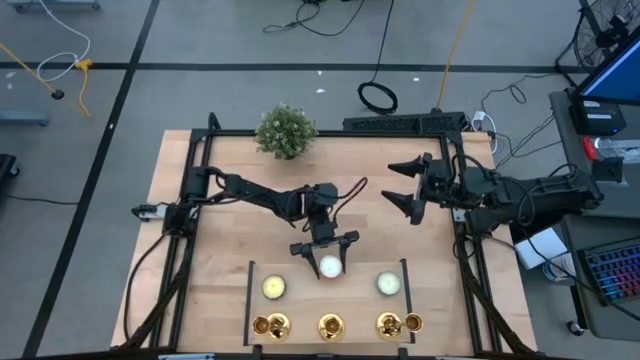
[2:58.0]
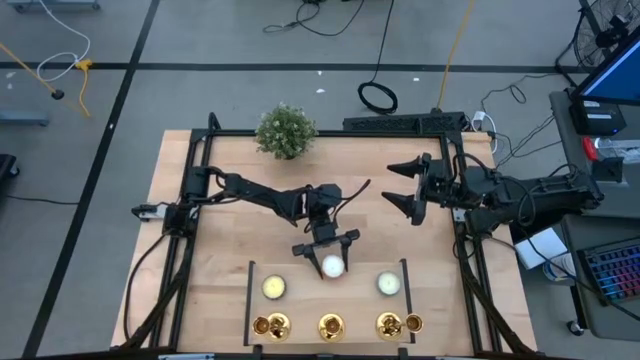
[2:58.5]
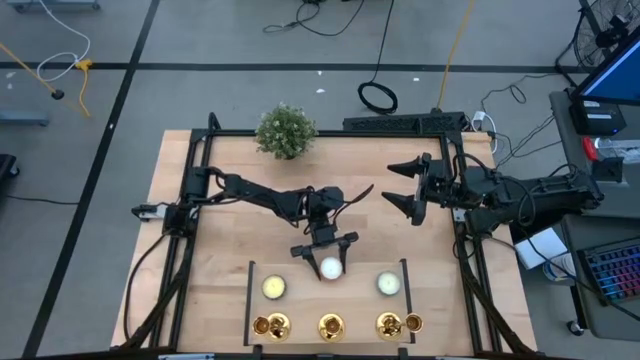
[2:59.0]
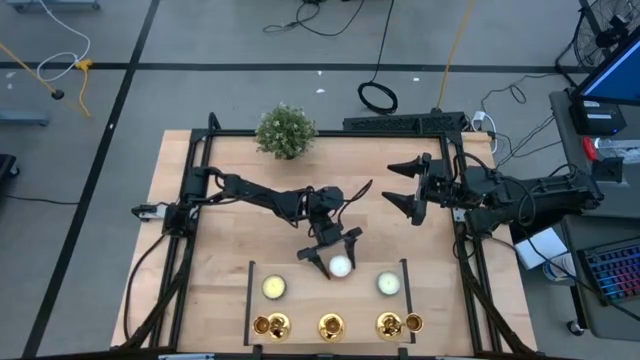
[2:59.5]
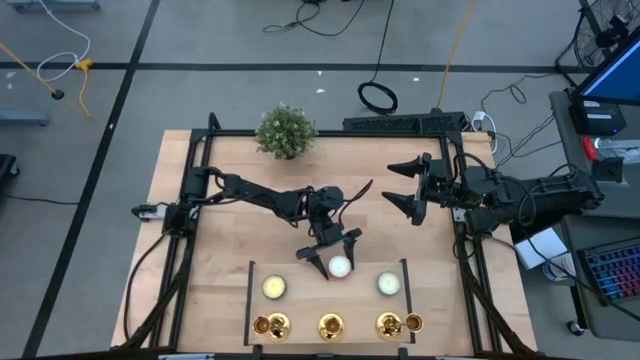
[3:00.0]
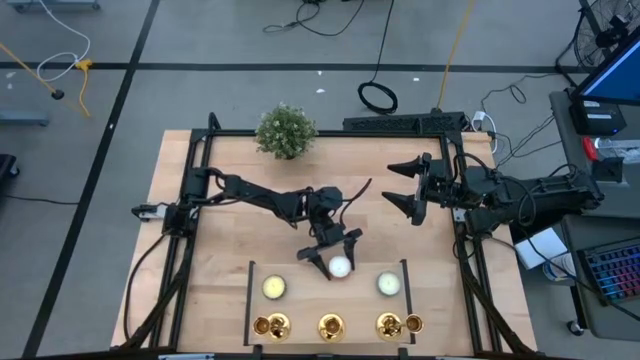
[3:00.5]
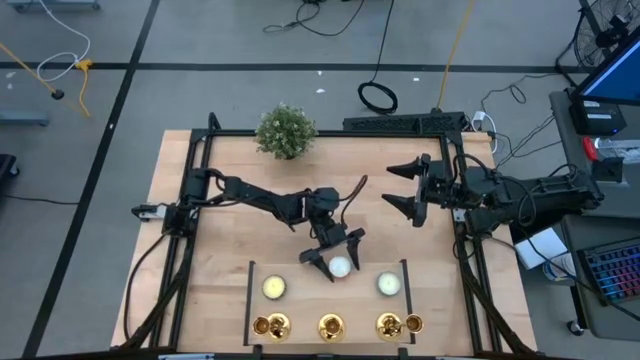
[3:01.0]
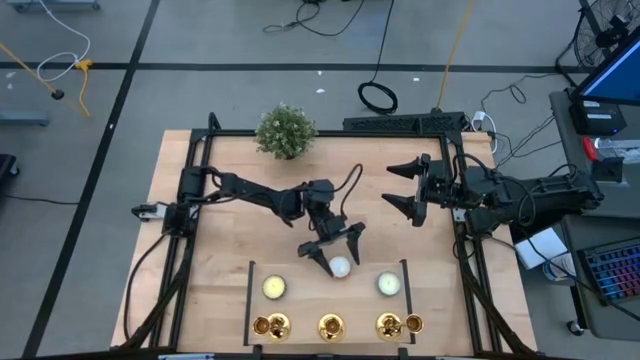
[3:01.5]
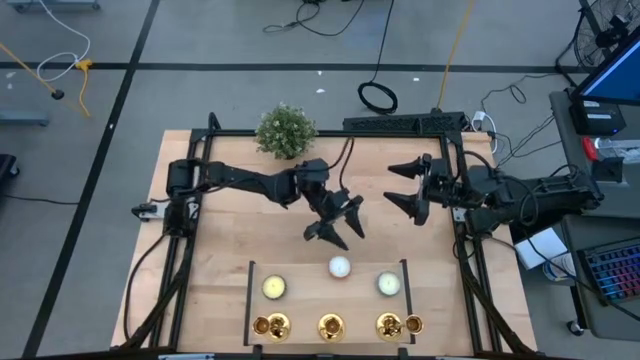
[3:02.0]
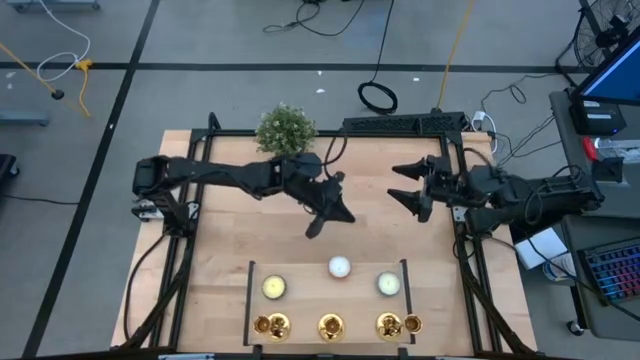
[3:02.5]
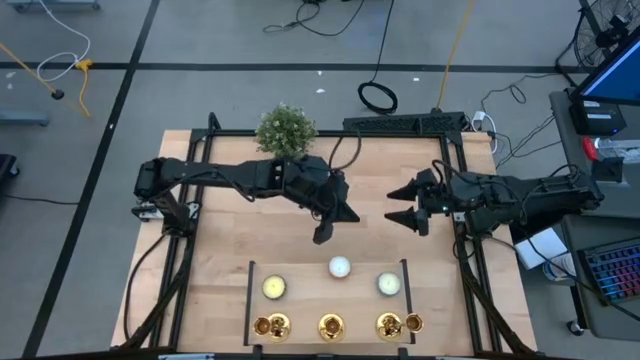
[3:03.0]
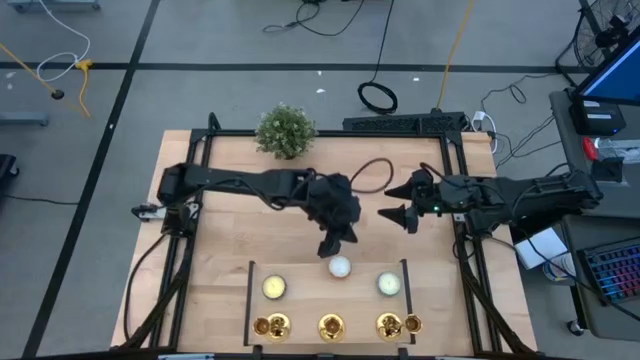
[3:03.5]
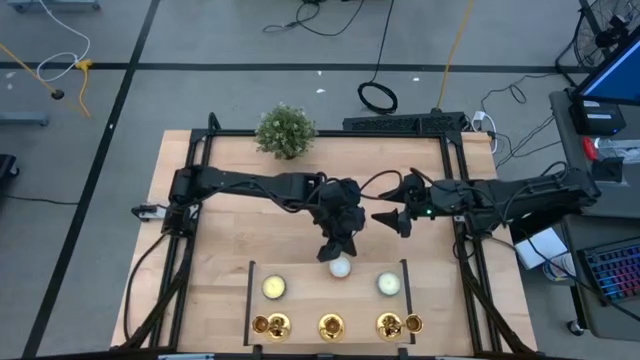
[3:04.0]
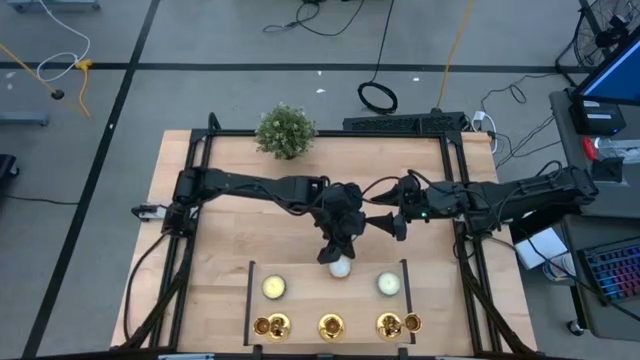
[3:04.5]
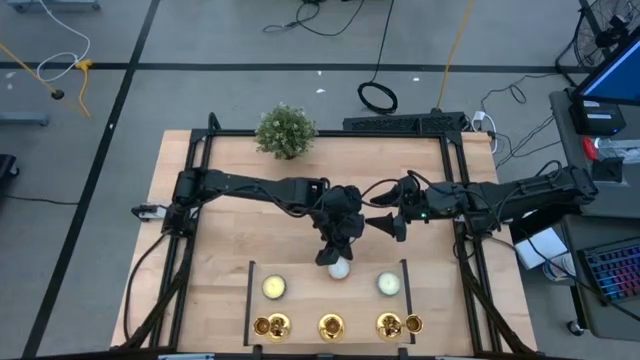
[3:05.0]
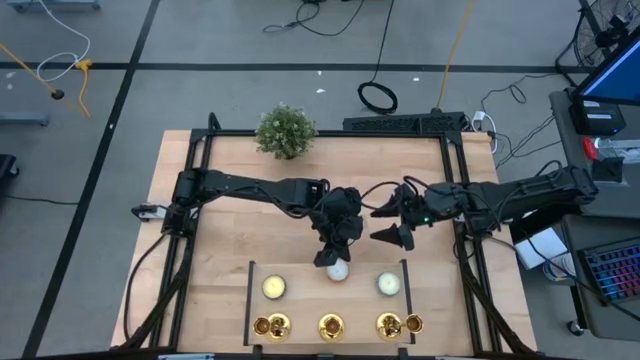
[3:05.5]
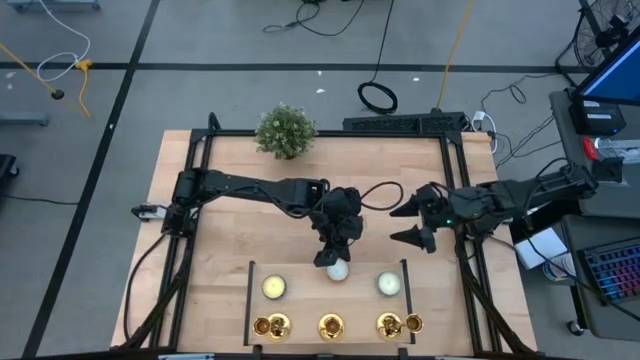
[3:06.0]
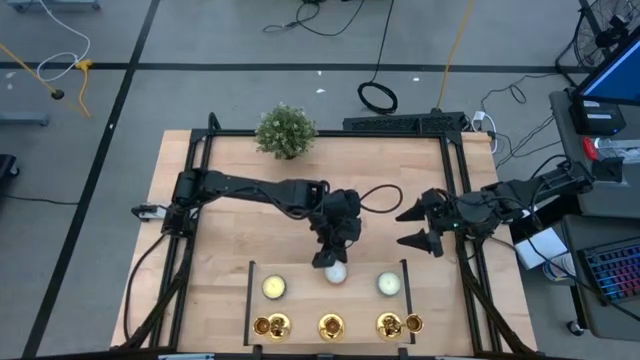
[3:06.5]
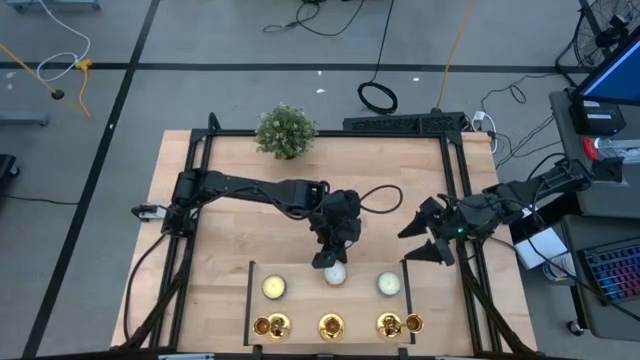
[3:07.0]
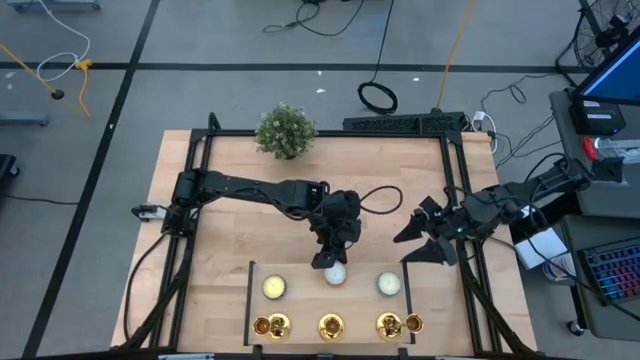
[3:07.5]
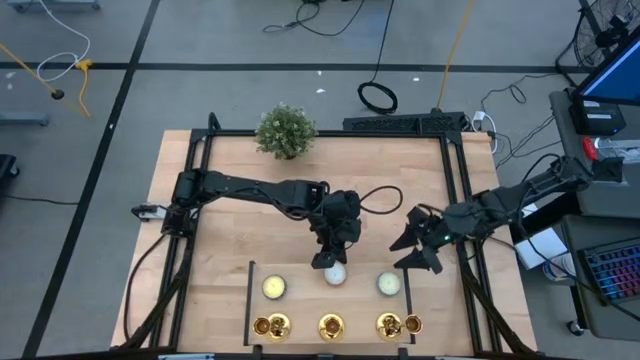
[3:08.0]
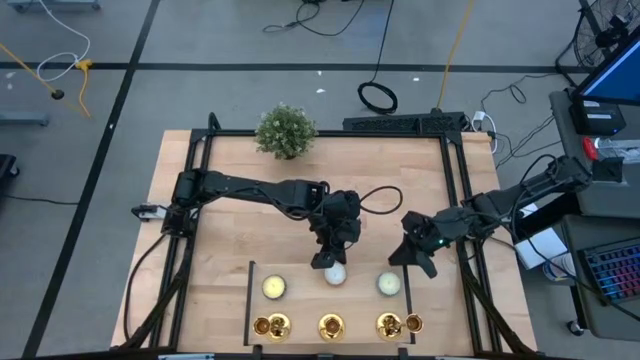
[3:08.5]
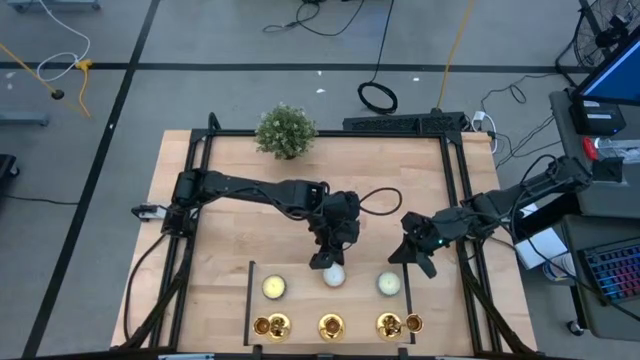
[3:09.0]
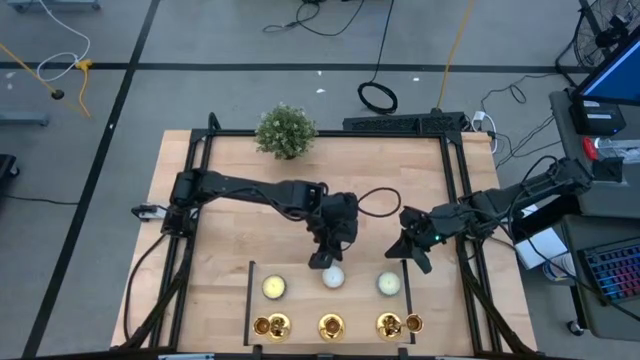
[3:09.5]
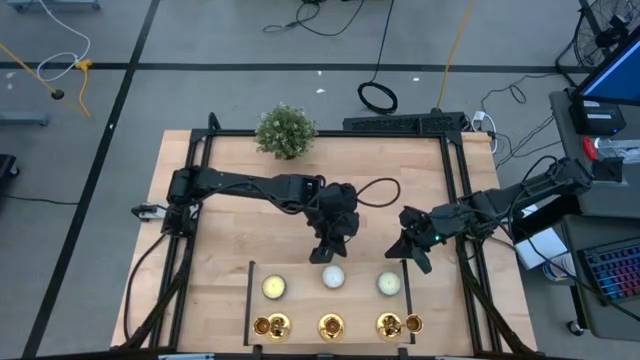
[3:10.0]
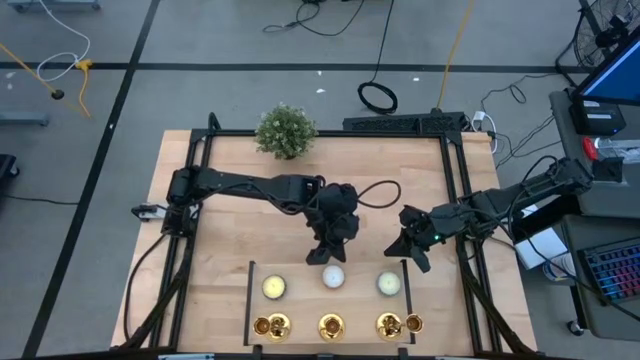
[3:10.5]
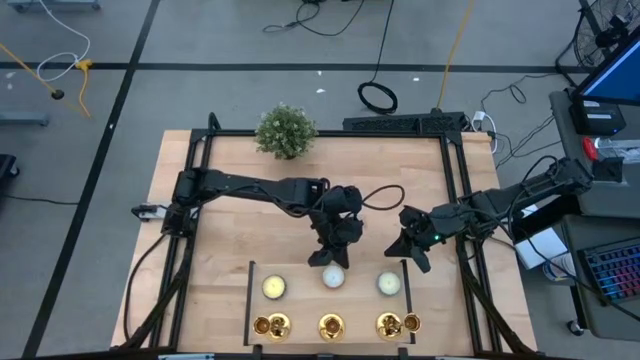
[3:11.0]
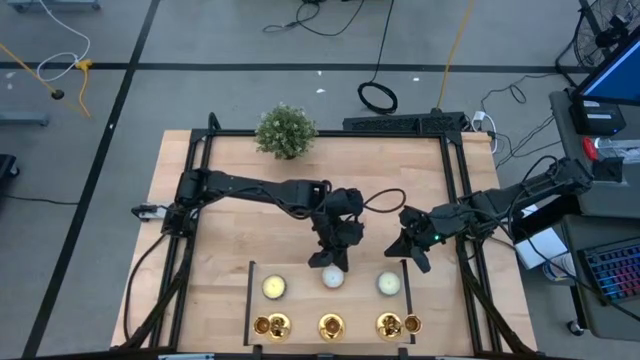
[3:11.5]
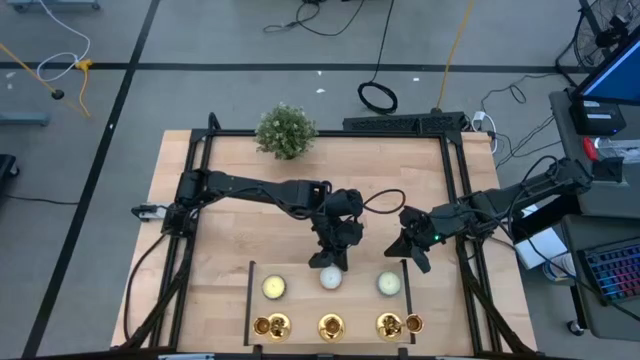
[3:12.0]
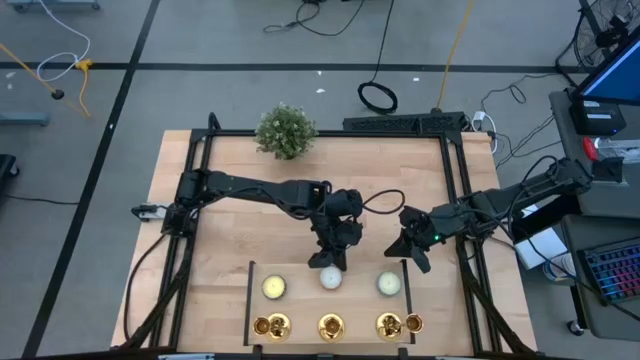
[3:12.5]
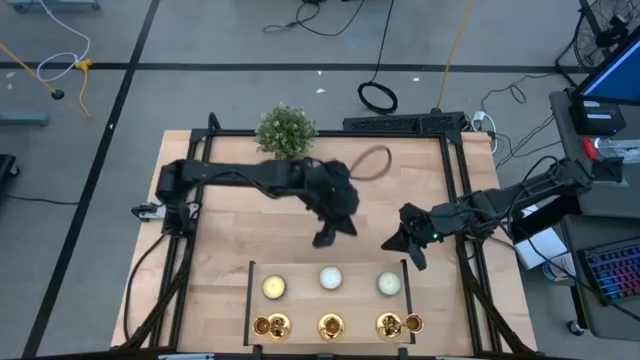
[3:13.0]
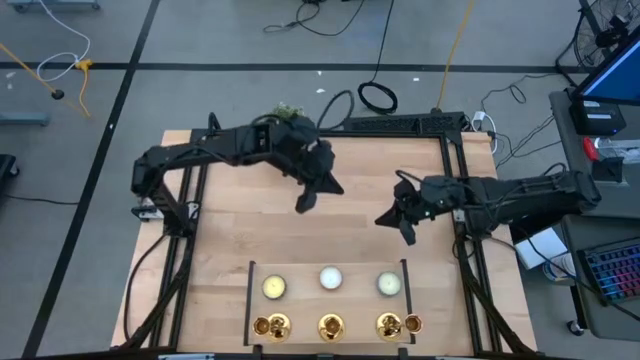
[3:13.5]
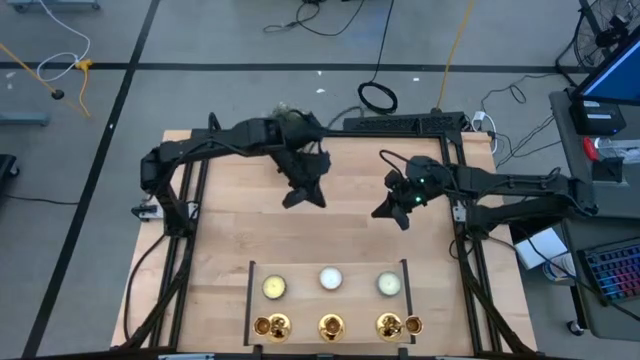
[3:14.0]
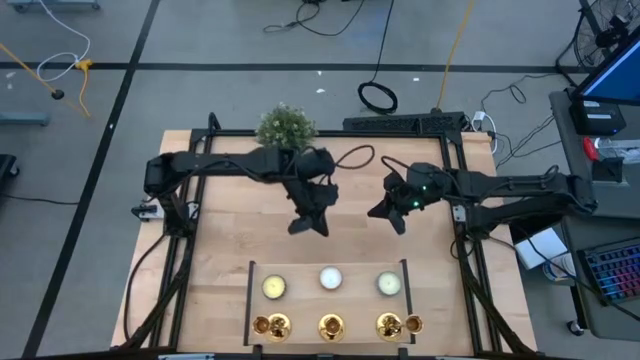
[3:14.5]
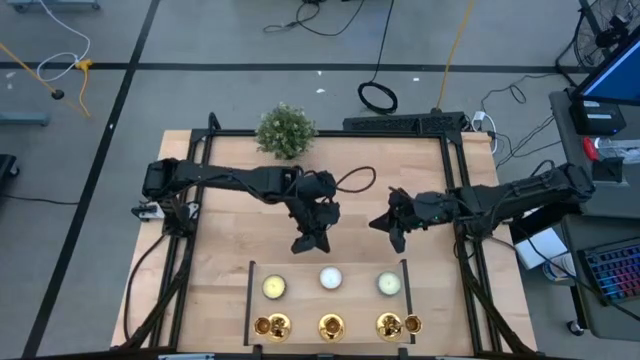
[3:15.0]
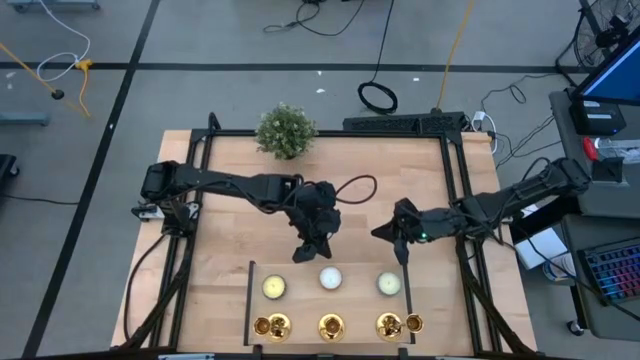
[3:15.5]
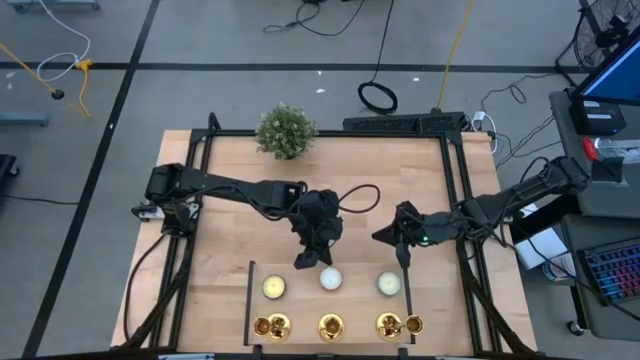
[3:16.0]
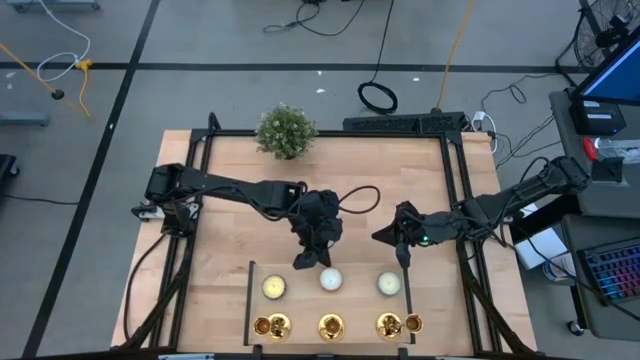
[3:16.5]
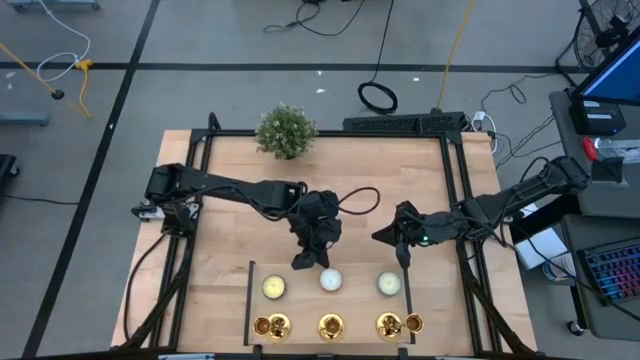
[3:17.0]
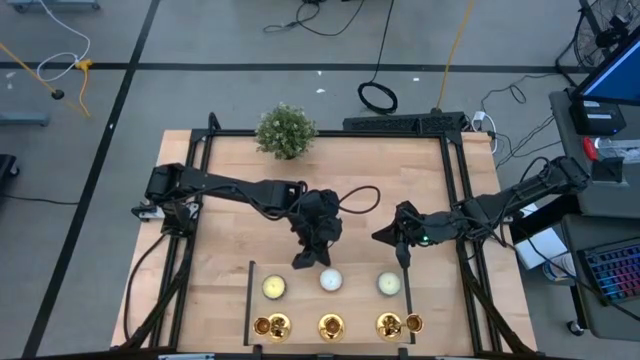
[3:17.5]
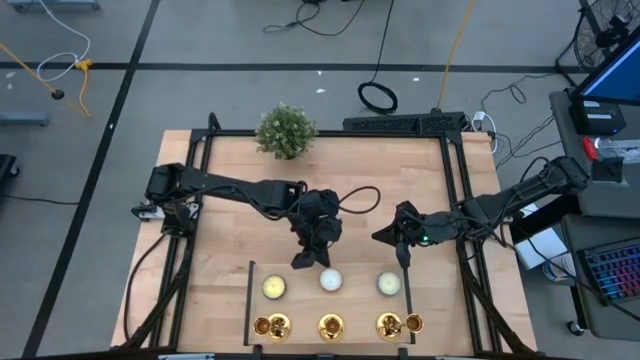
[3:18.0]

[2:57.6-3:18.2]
Task: Pick & Place candle stick holders
Put the yellow patterned scented candle on the shelf

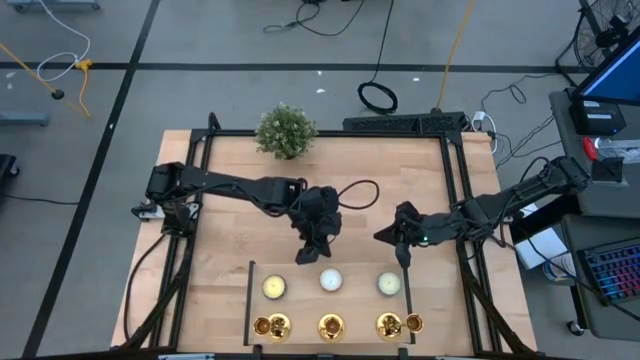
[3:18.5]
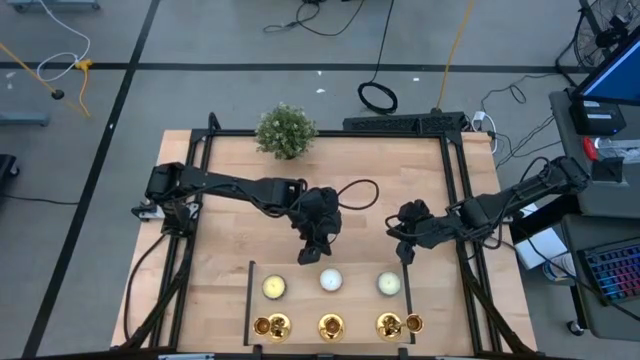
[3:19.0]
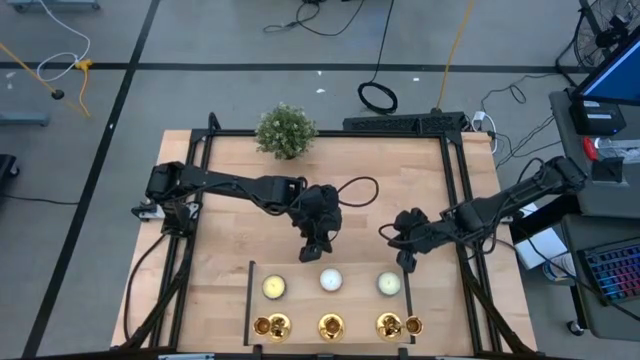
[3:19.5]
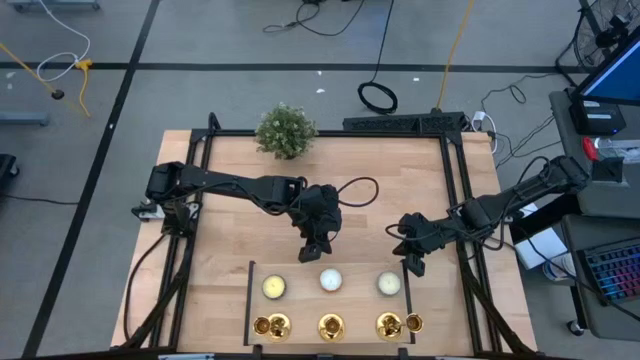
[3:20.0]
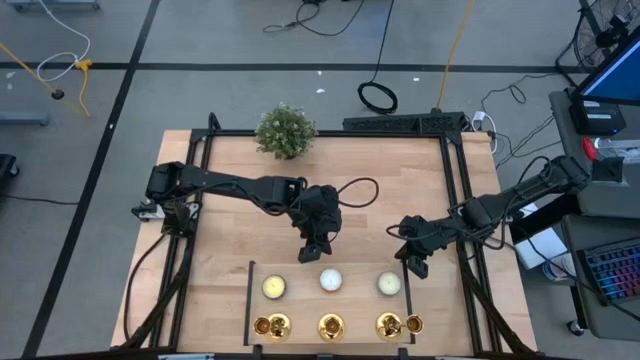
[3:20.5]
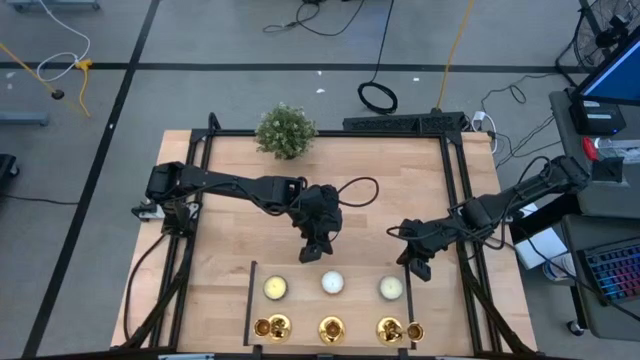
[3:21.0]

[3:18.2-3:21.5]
Adjust the shelf
